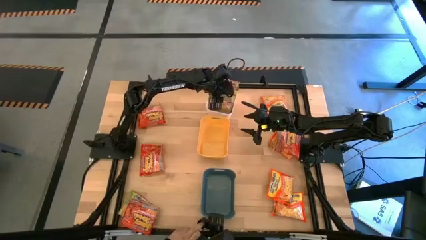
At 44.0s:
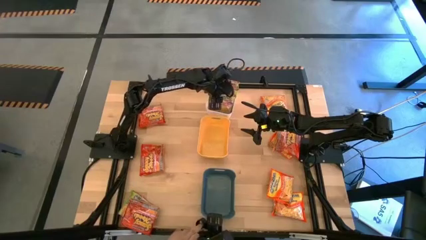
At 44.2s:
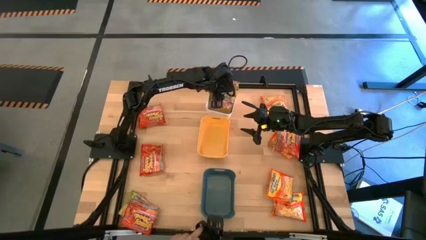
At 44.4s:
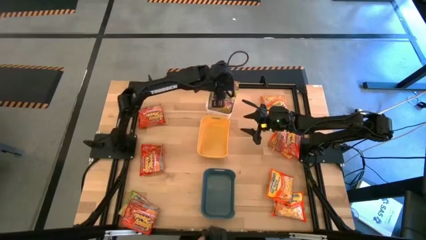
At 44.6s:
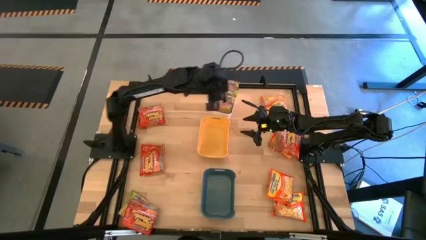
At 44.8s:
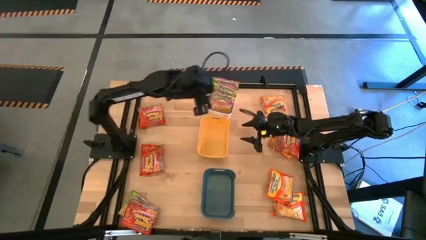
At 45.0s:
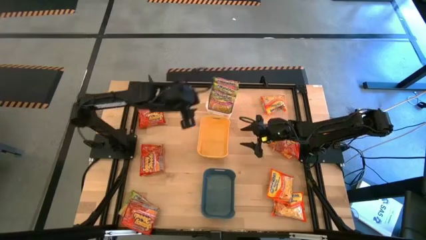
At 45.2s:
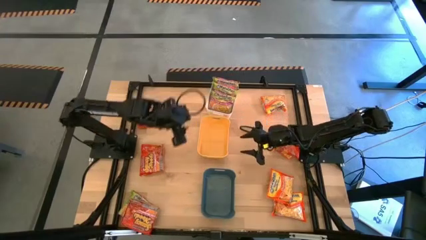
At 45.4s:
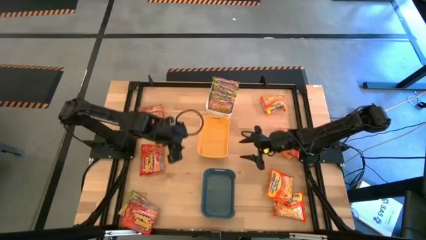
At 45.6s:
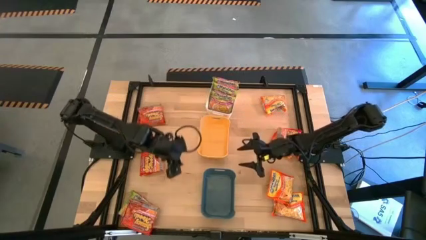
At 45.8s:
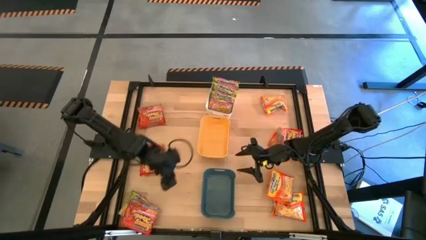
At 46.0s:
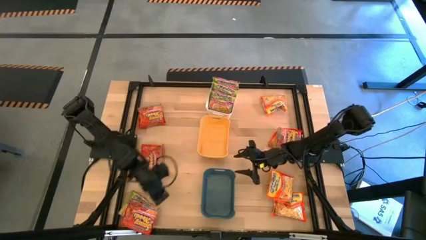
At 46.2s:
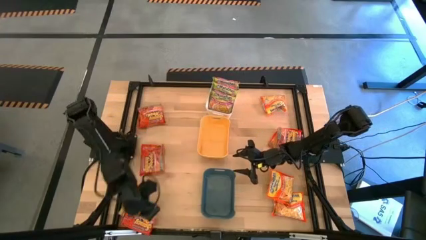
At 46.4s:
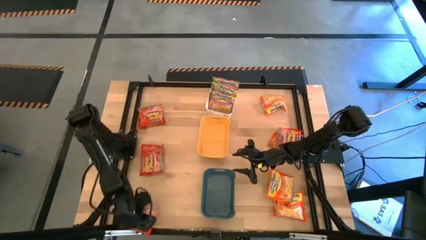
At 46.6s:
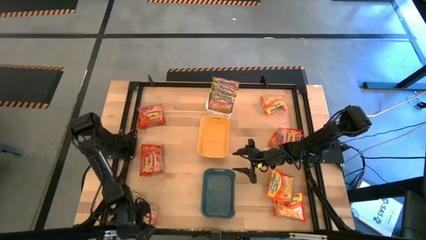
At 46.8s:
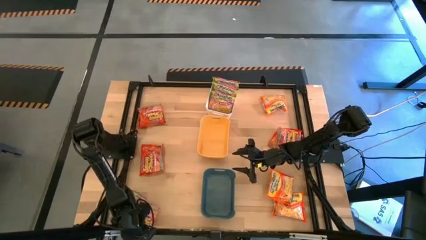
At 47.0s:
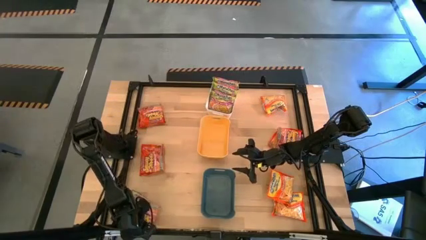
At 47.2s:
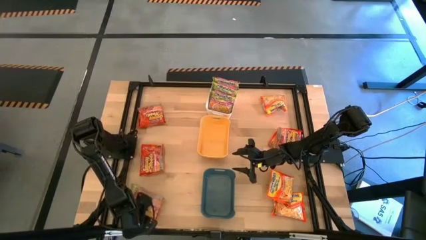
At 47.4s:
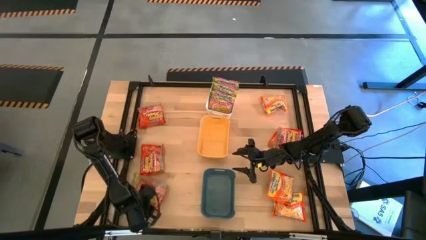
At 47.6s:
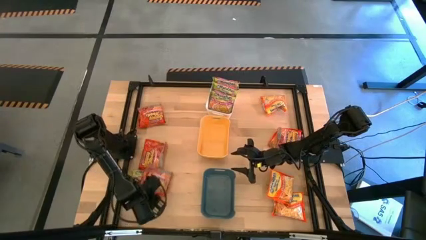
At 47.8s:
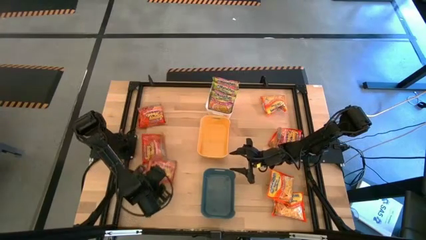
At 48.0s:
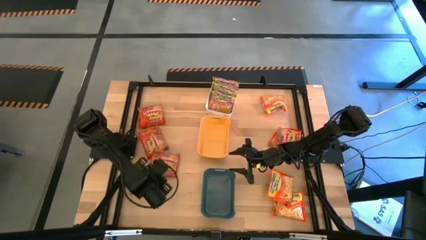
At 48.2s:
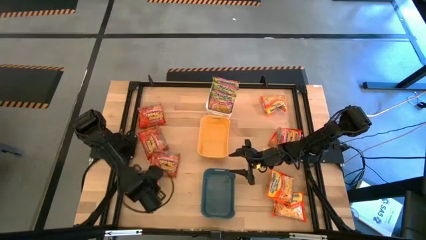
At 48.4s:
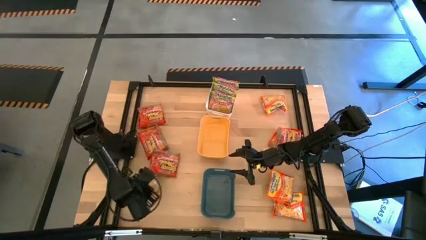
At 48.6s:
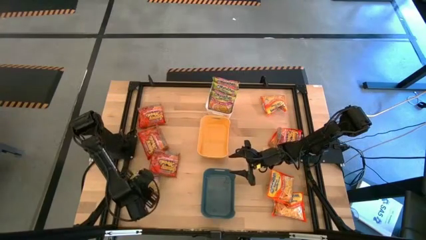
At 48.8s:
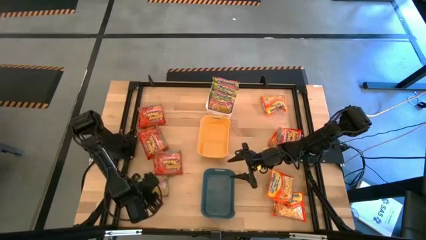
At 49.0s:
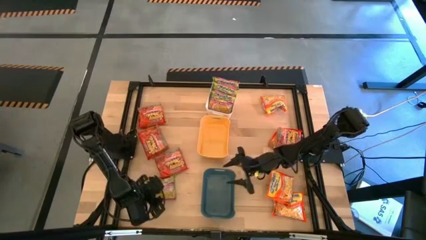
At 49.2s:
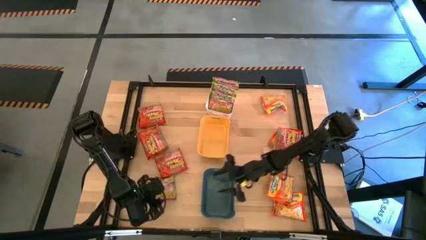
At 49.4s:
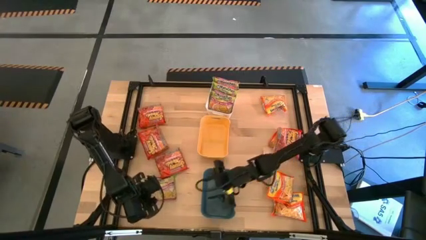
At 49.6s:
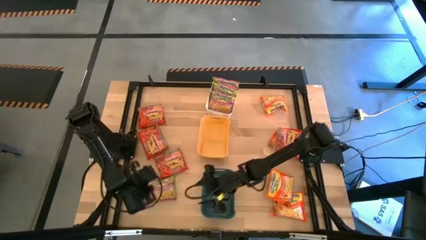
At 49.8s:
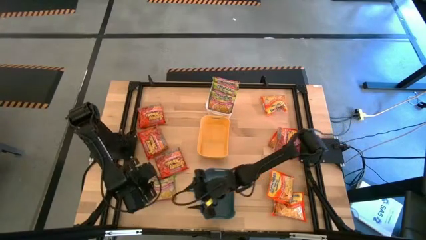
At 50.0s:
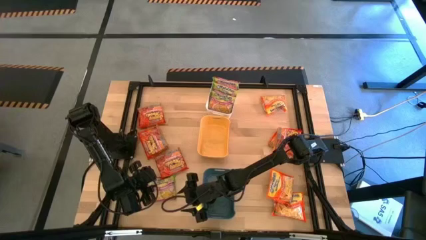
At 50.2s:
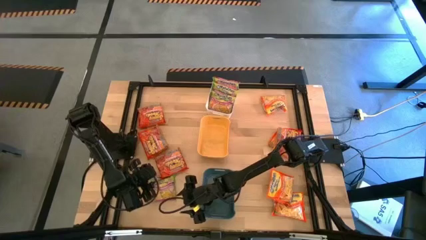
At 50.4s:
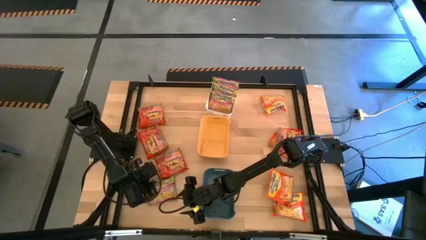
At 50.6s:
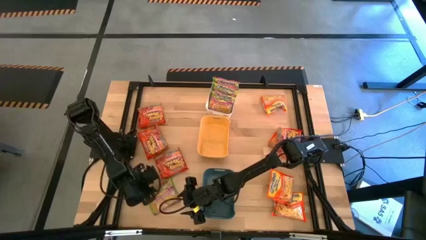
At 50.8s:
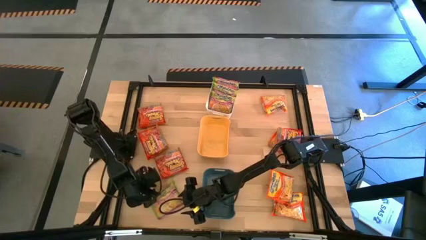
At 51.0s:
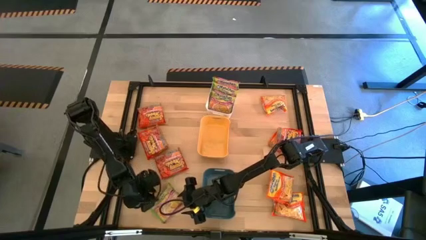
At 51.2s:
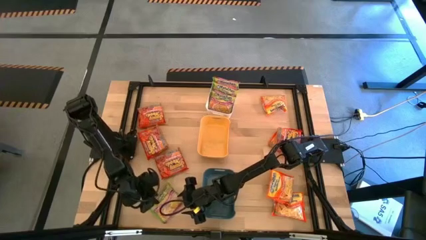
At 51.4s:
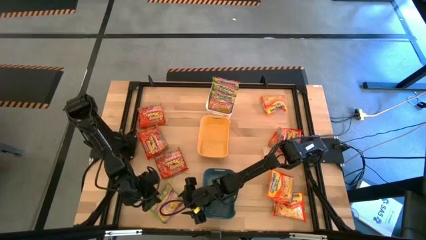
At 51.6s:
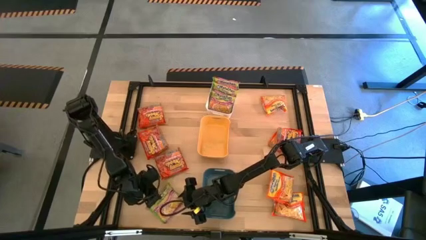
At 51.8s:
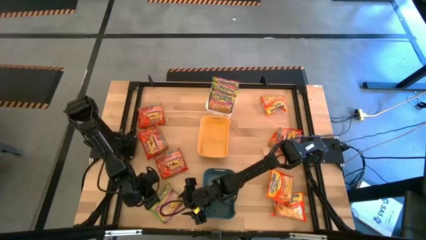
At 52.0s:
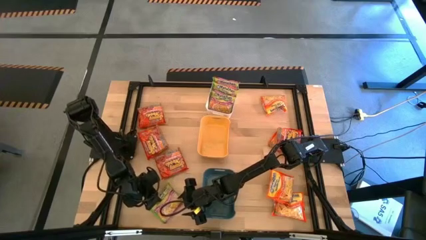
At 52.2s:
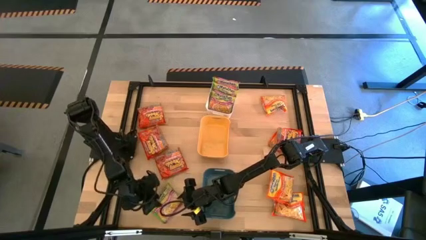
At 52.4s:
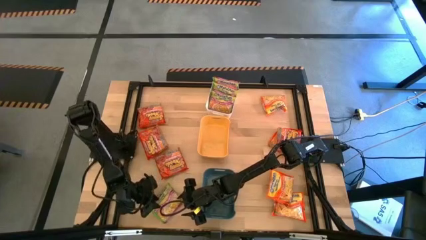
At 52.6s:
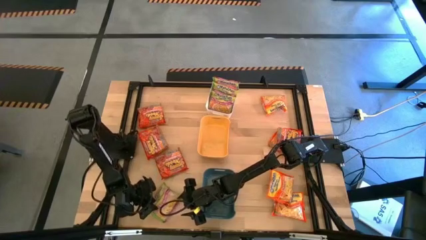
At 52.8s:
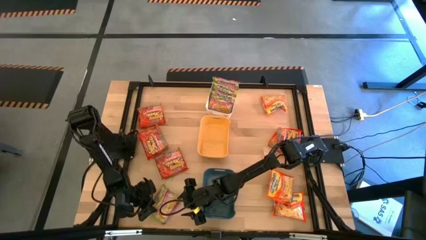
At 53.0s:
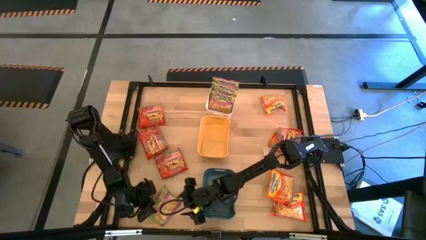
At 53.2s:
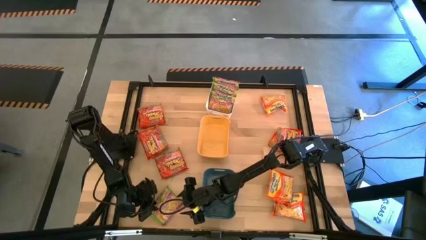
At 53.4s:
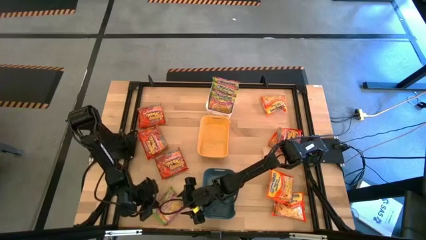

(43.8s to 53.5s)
Task: Sort Maruchan noodles
Put the green noodle pack into the white bin

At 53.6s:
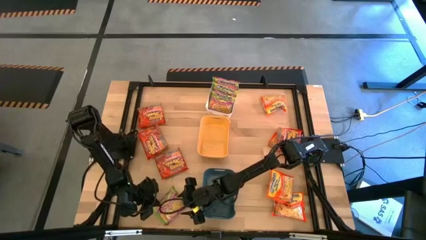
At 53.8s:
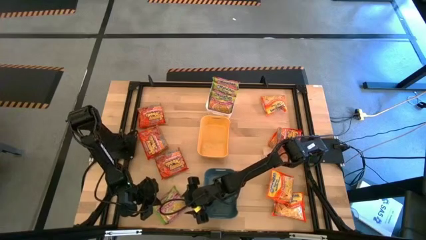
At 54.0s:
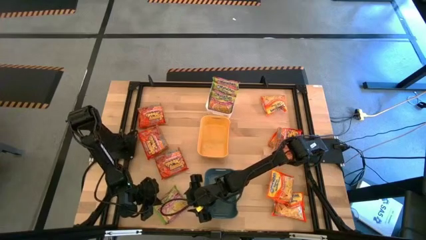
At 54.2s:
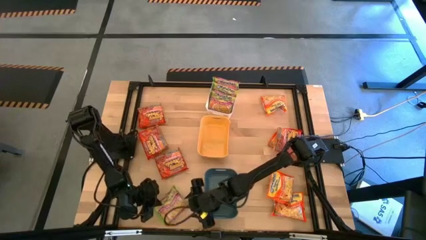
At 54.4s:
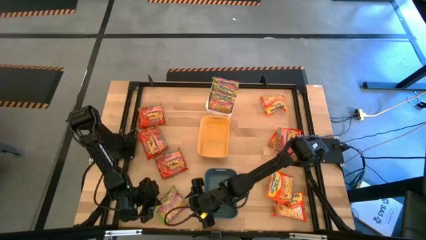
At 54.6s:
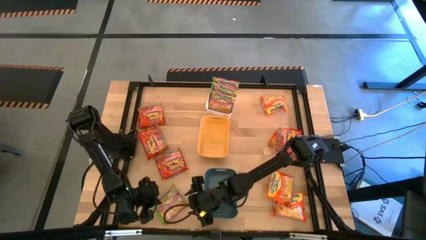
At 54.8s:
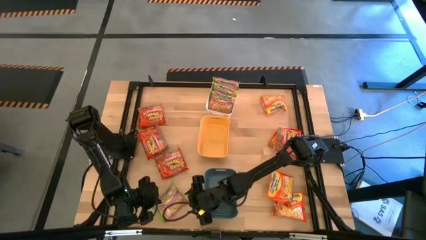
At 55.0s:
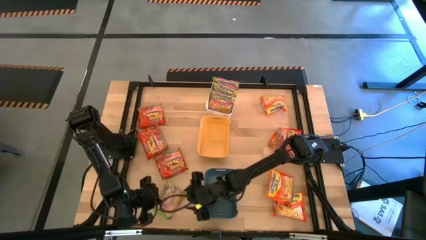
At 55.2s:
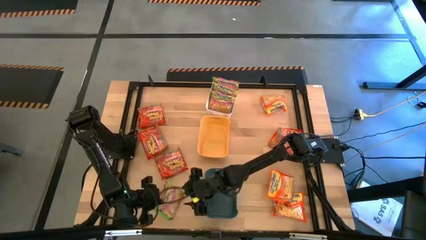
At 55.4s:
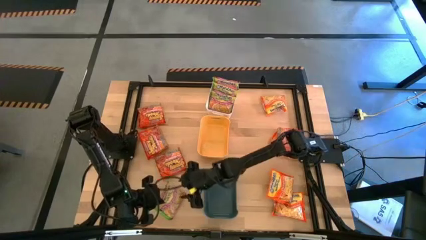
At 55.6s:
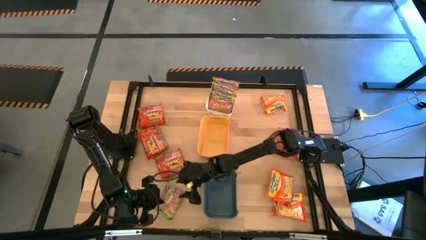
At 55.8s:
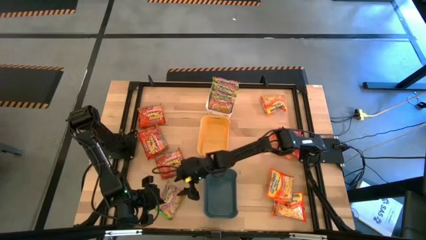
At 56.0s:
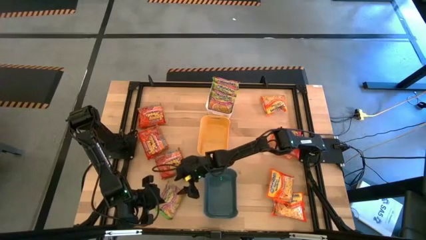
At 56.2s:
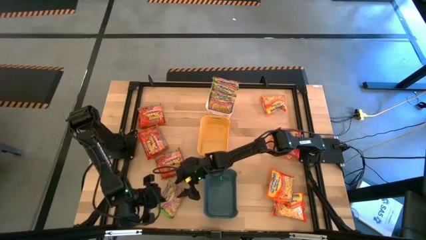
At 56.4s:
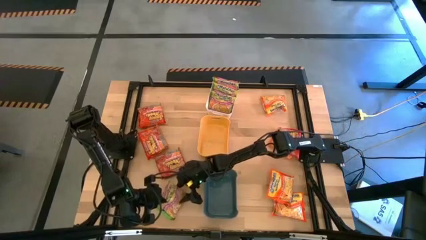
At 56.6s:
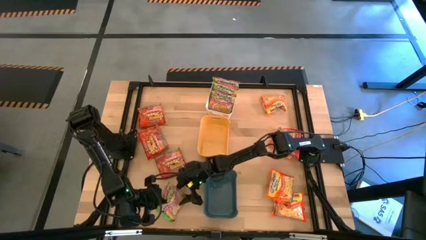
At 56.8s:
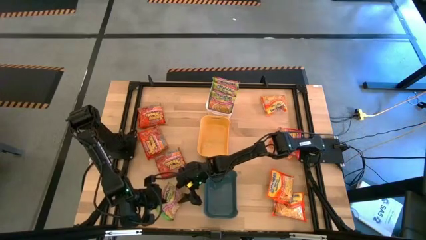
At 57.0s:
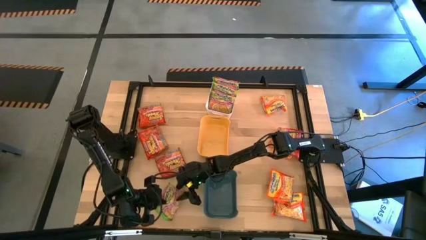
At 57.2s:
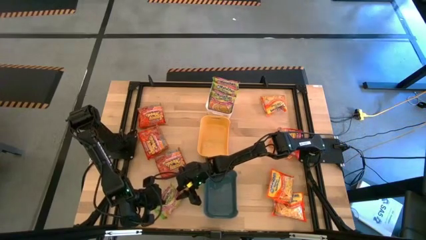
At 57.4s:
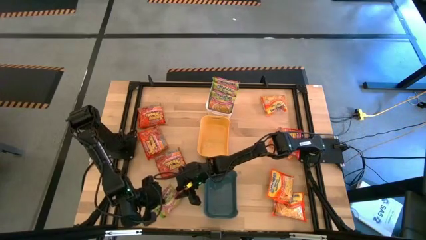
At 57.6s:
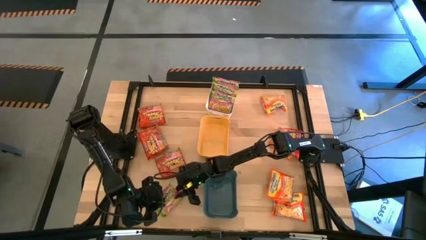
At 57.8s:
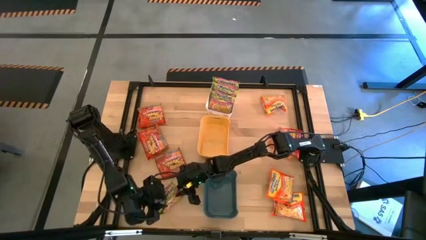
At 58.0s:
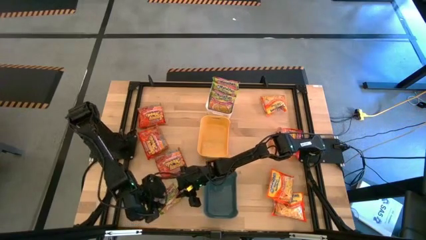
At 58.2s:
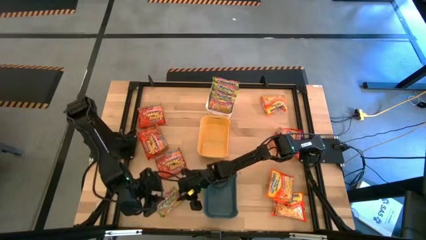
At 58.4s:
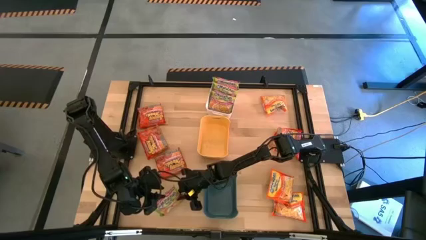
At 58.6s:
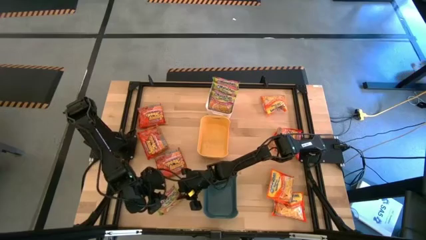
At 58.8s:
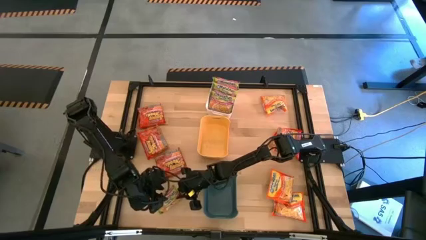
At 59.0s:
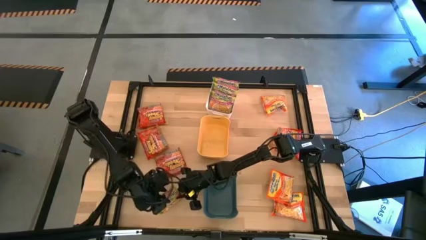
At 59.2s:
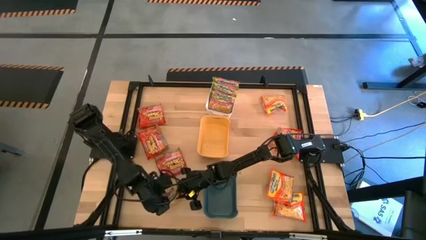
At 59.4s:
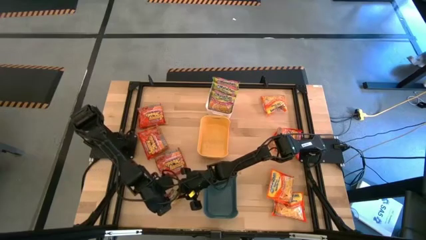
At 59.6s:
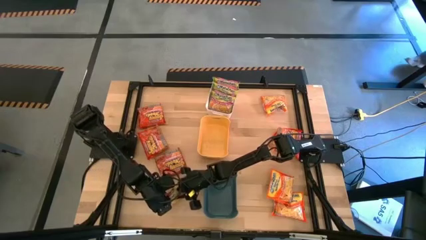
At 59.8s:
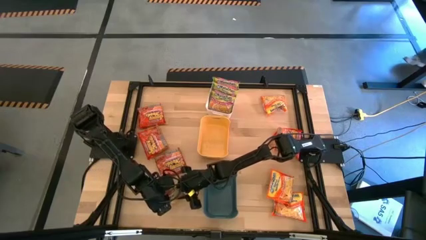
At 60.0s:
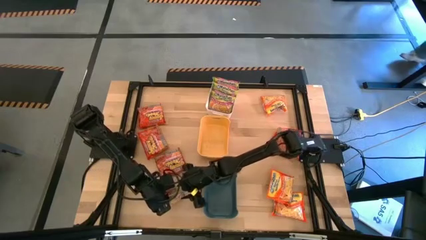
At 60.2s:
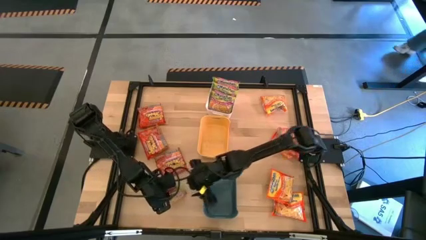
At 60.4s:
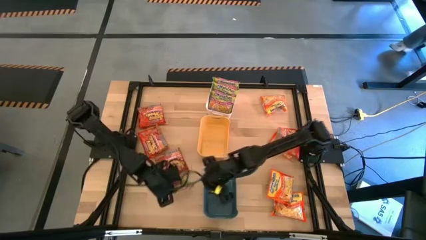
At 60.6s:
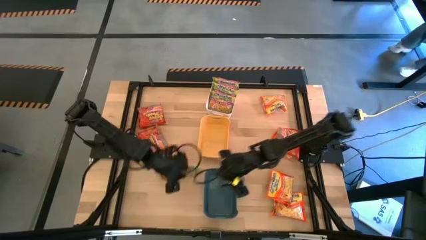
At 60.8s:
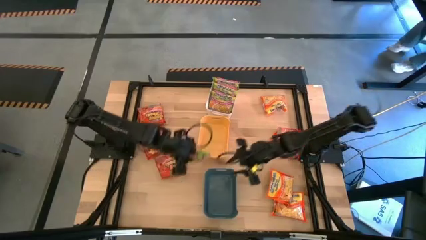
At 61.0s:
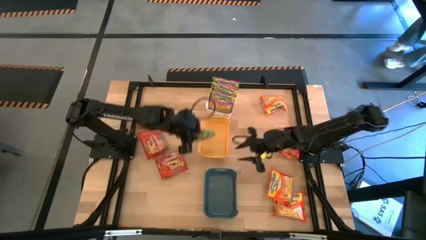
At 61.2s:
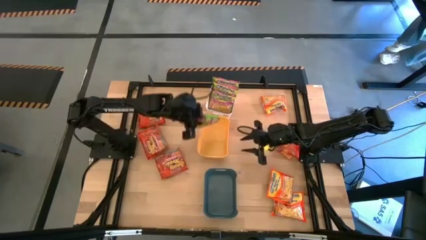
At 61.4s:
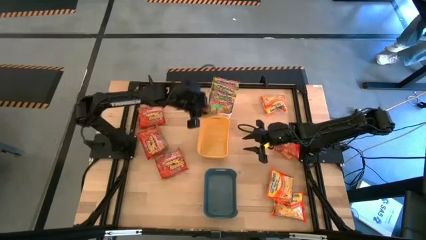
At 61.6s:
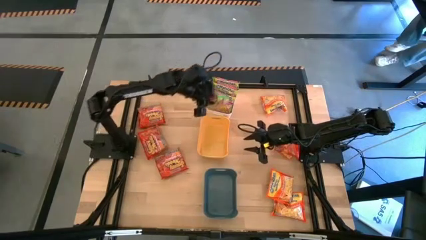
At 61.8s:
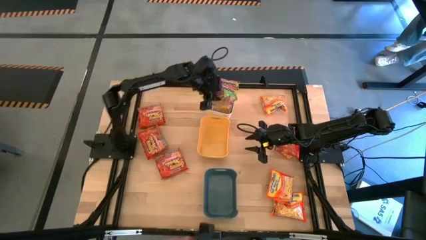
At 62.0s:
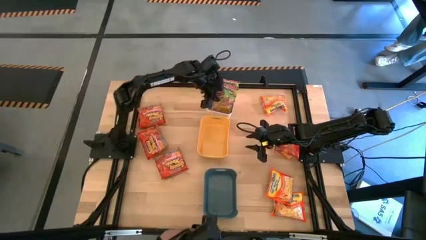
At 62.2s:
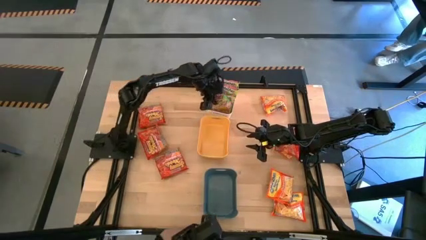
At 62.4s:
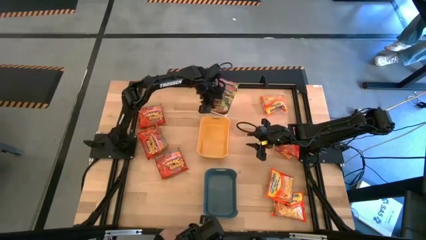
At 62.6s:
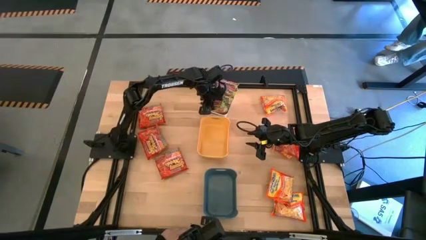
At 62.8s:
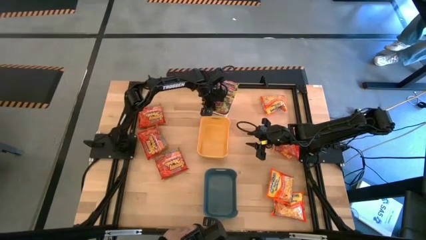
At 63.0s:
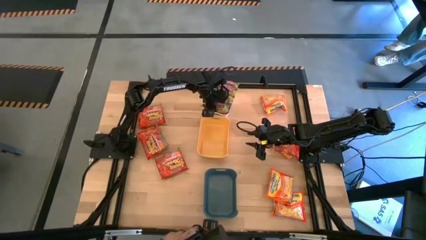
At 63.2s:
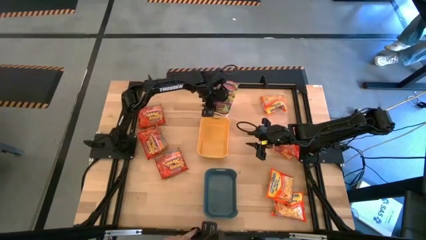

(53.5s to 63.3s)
Put the green noodle pack into the white bin
